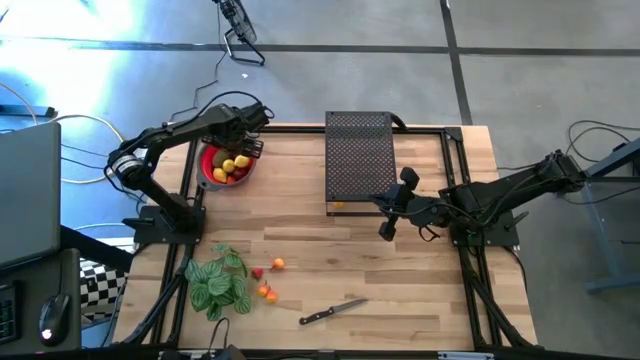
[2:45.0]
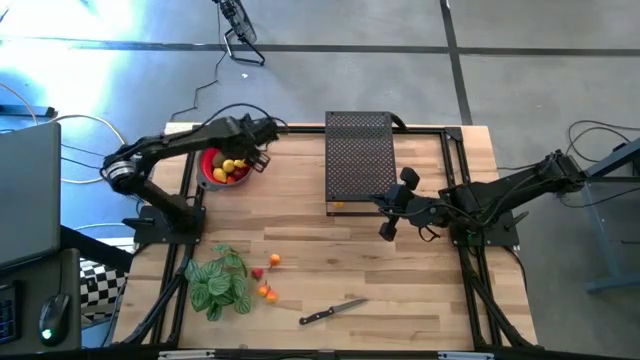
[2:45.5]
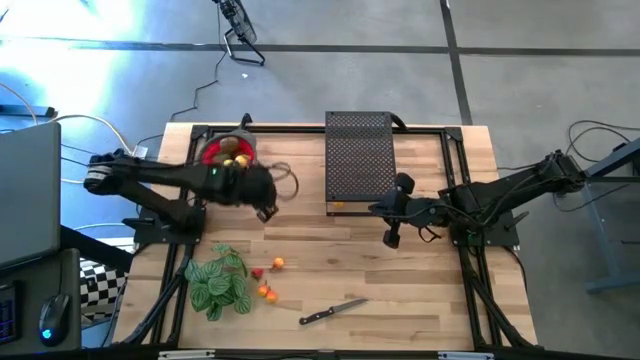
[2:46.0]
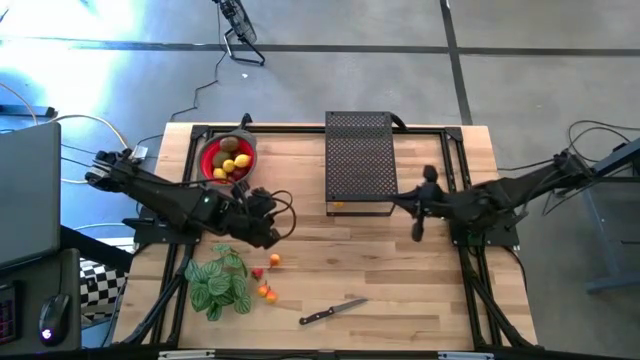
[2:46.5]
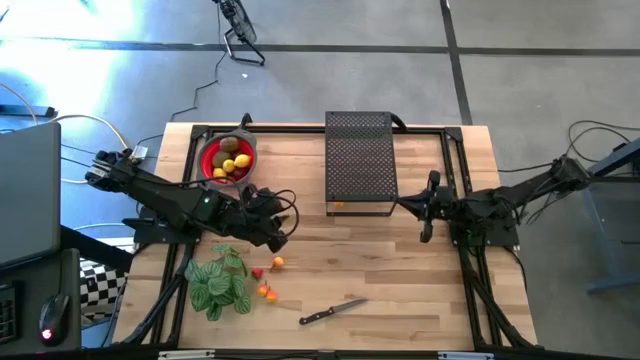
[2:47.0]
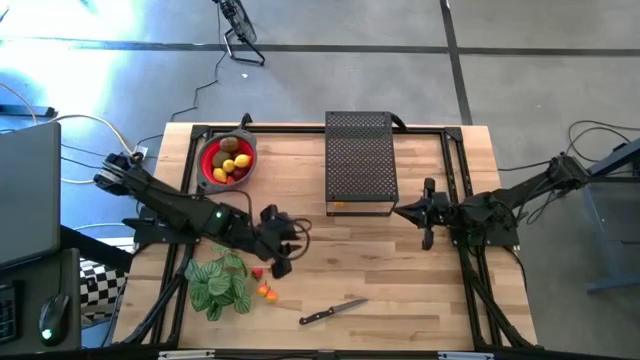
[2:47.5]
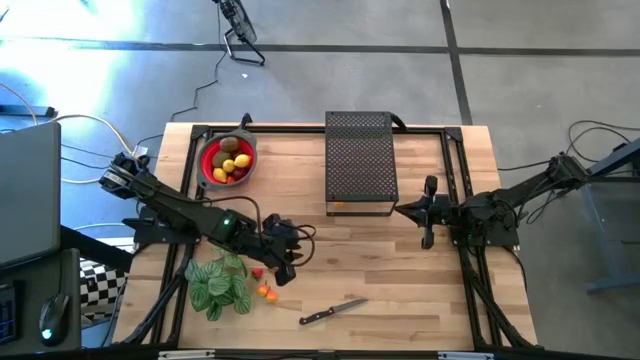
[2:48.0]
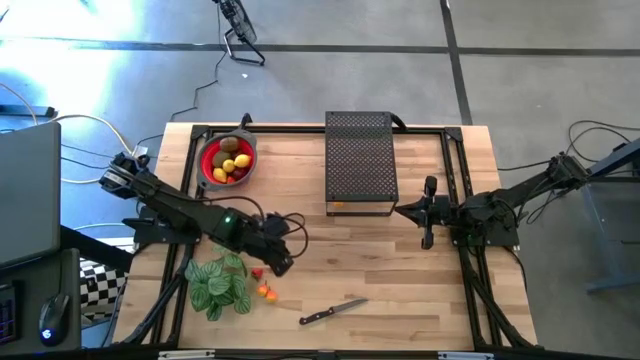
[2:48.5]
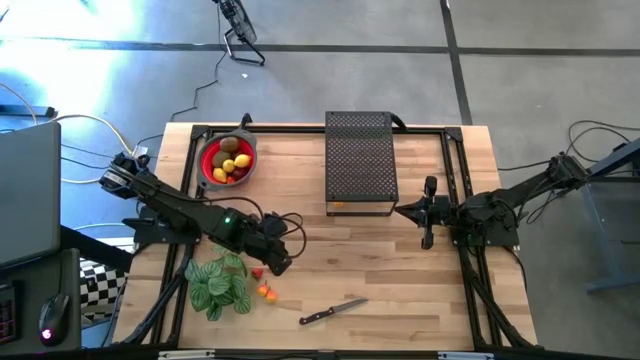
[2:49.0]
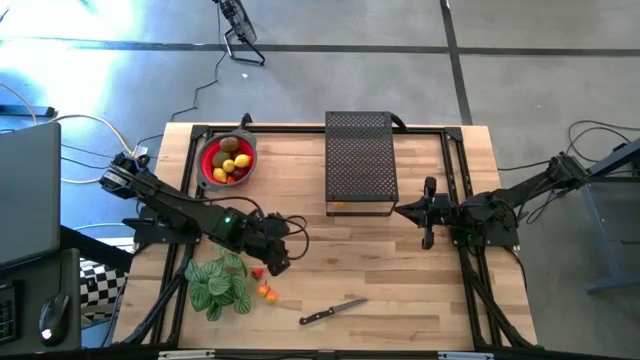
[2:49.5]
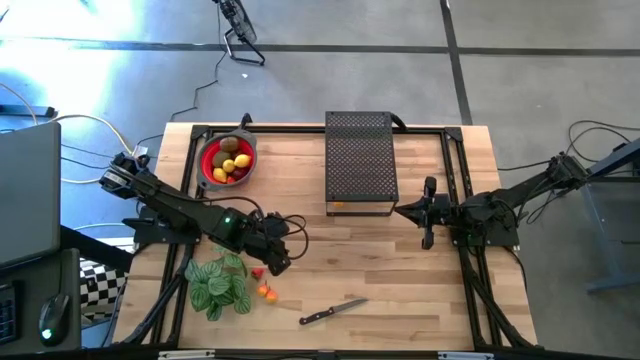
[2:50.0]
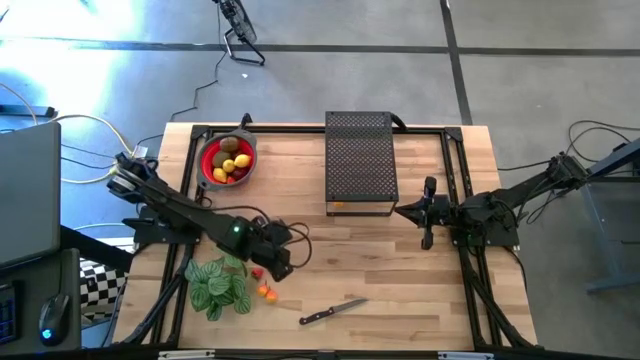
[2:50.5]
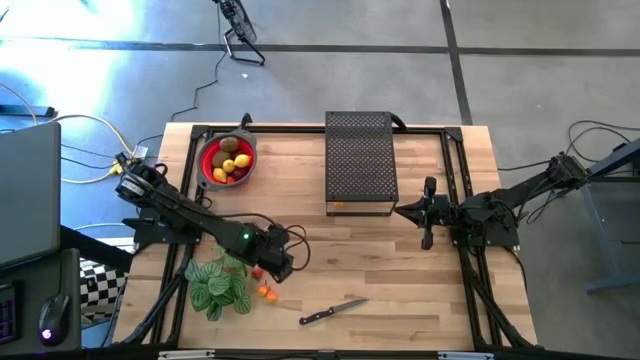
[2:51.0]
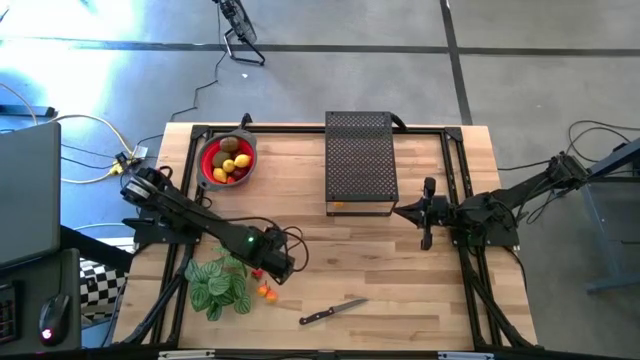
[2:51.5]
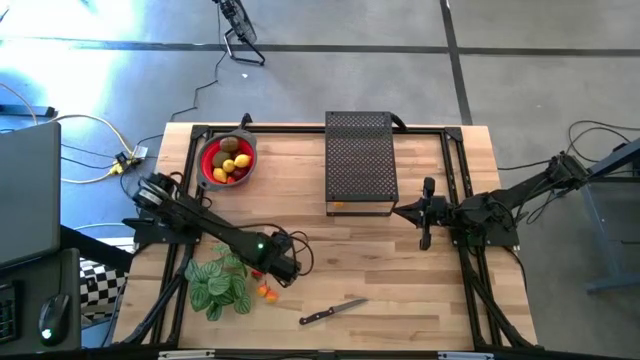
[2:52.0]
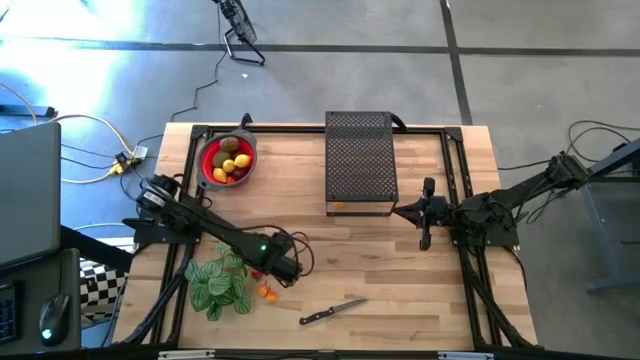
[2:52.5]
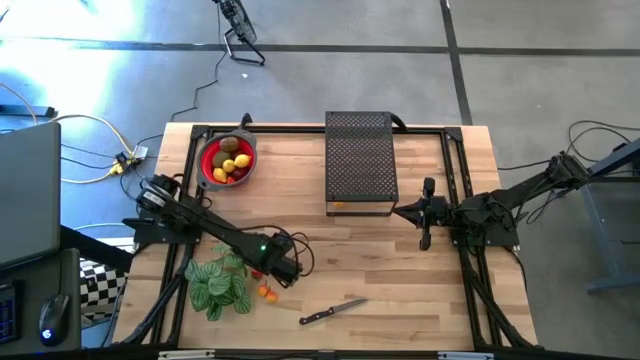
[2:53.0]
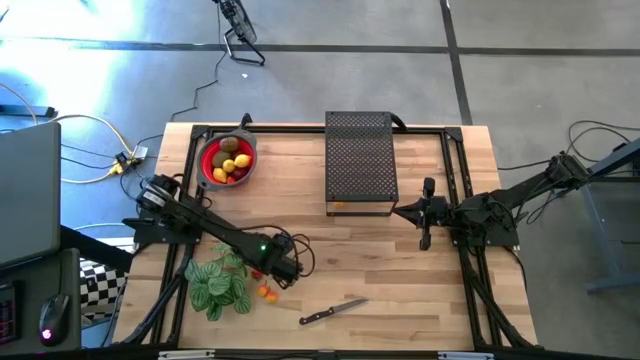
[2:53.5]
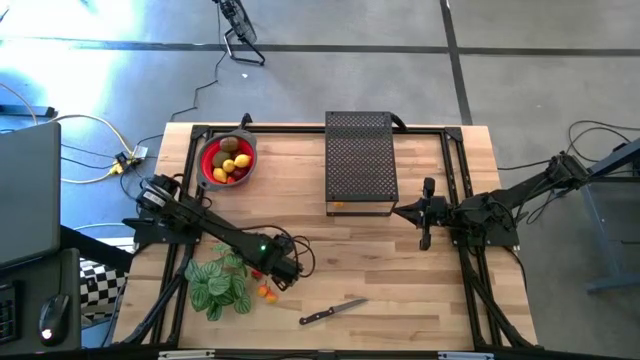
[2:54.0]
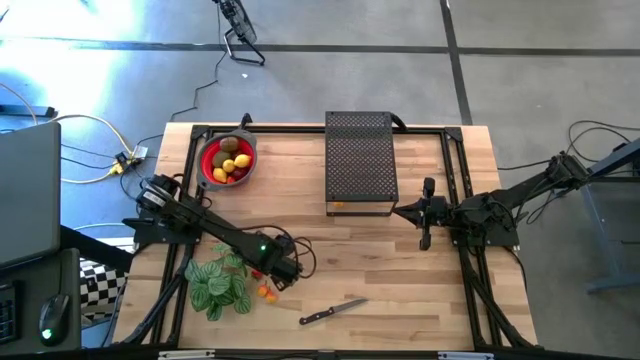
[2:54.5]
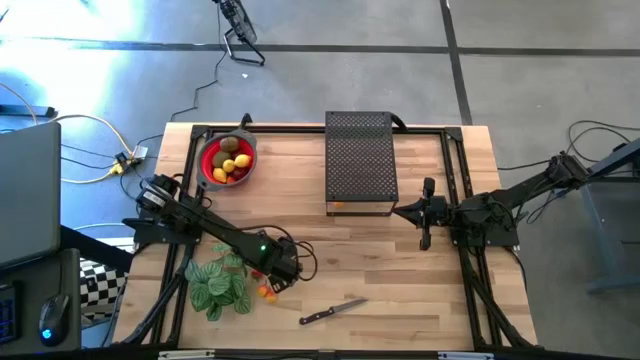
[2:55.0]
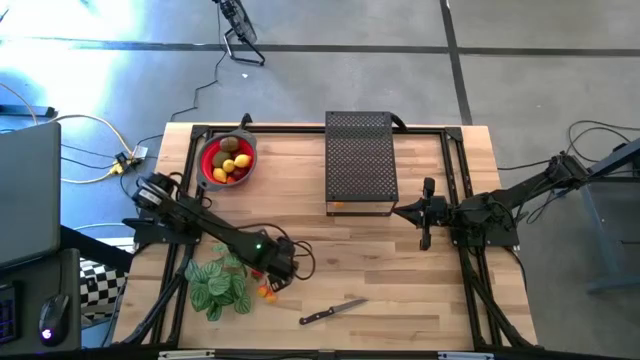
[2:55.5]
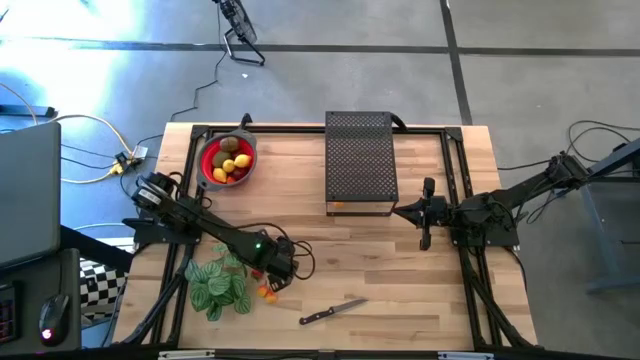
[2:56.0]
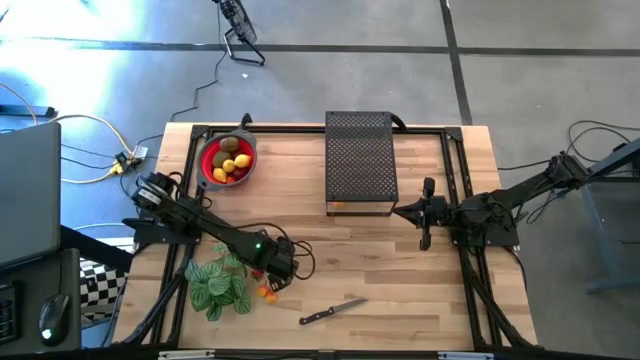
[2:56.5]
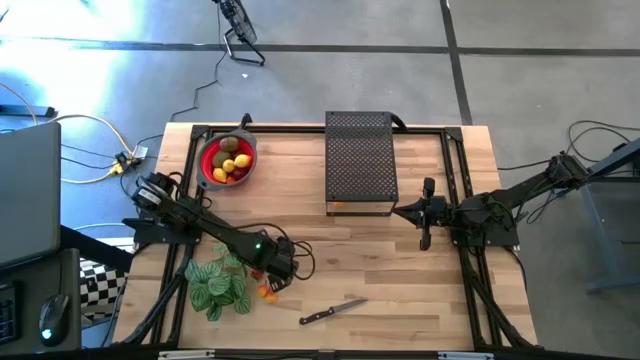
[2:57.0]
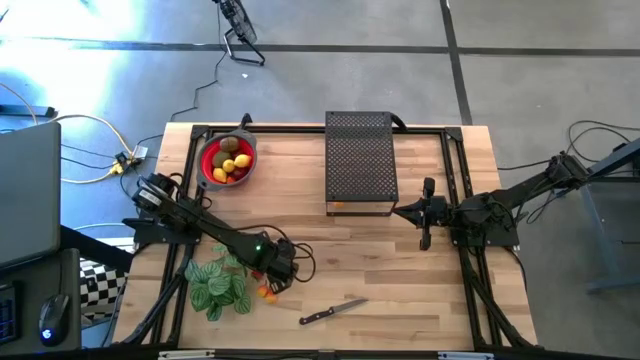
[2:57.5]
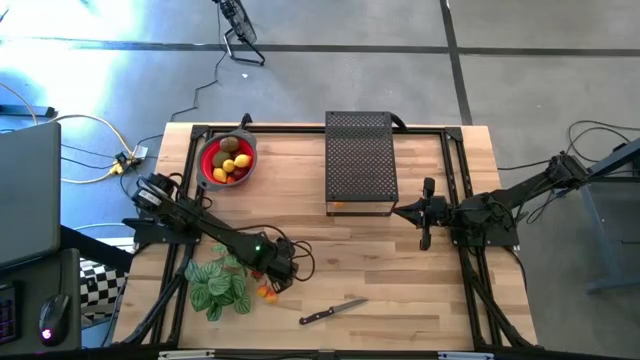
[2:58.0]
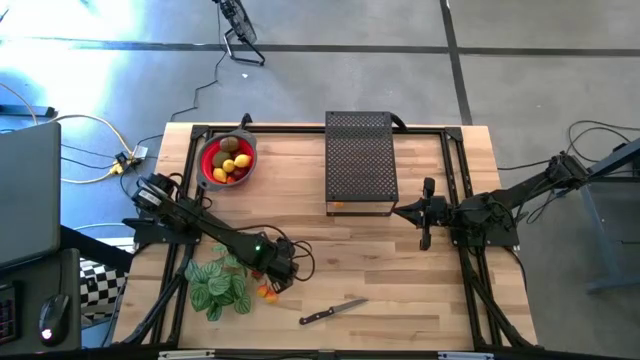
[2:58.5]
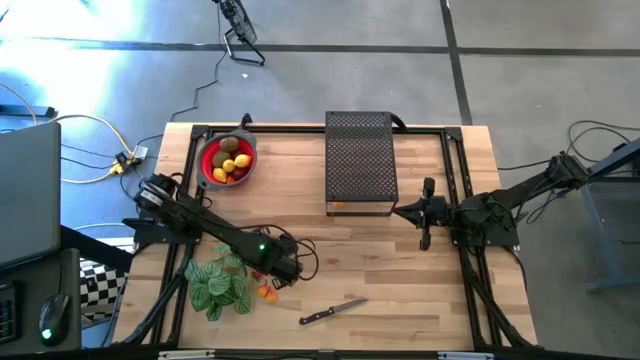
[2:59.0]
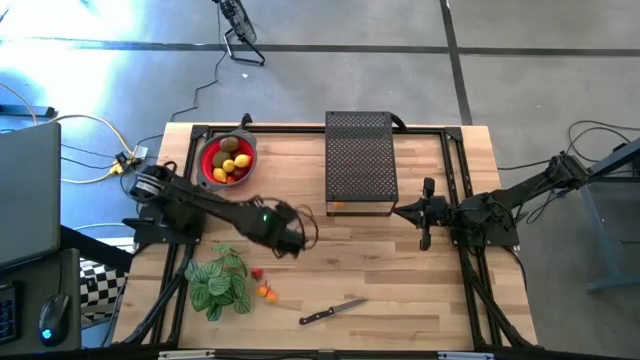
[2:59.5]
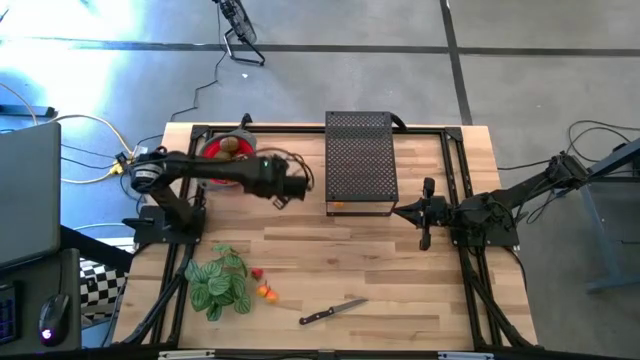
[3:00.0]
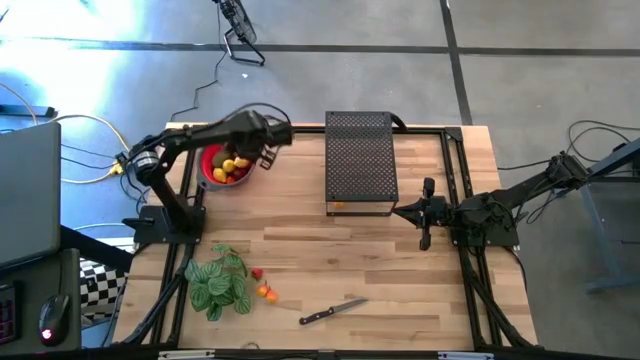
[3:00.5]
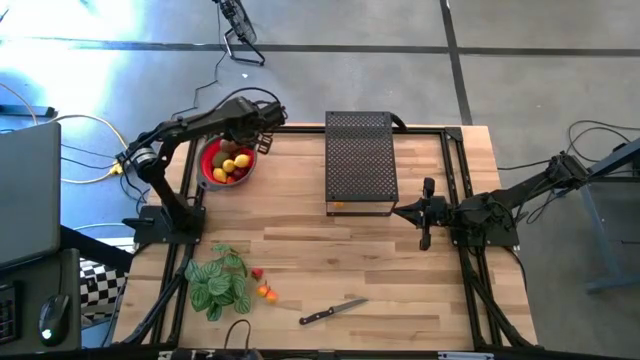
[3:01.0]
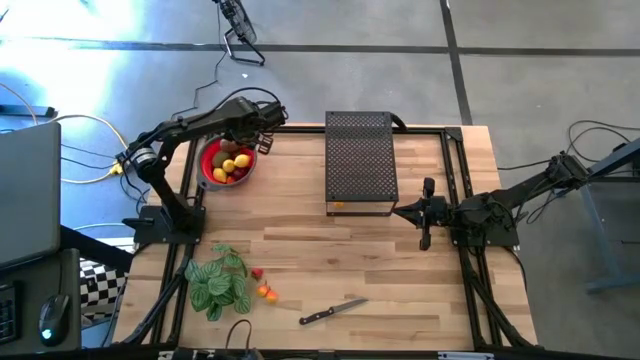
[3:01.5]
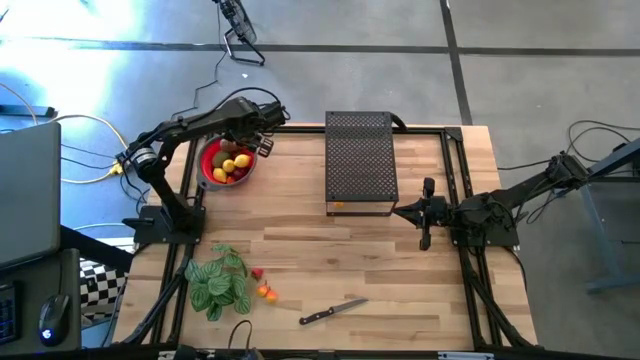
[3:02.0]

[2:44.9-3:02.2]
Task: Pick & Place Fruit
Put the orange pear into the strainer bowl

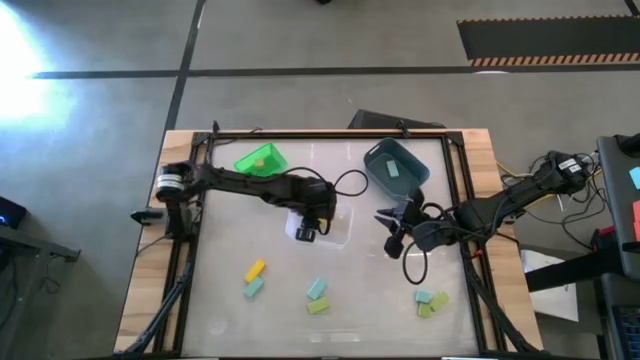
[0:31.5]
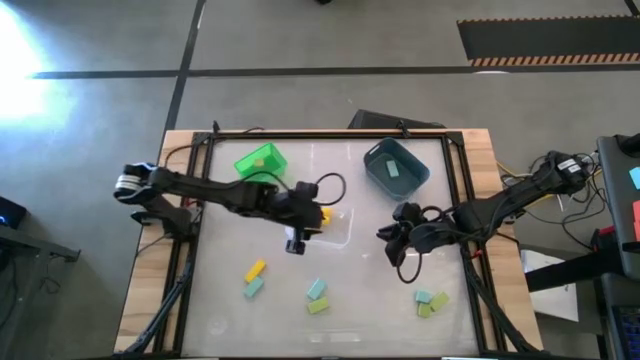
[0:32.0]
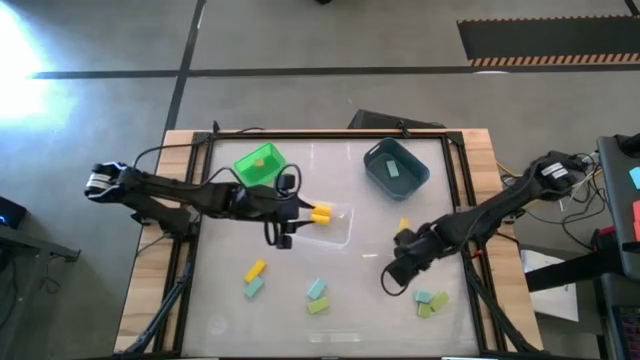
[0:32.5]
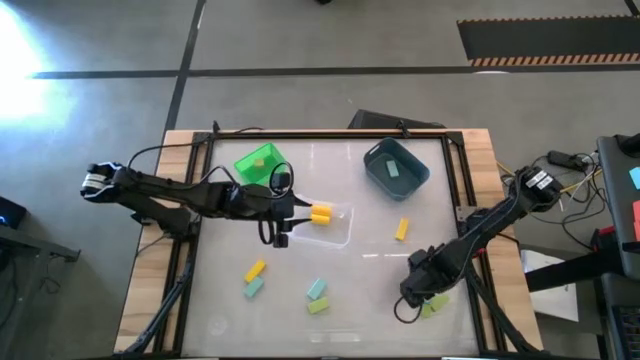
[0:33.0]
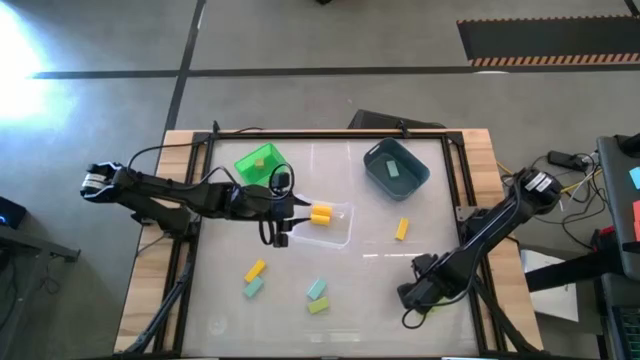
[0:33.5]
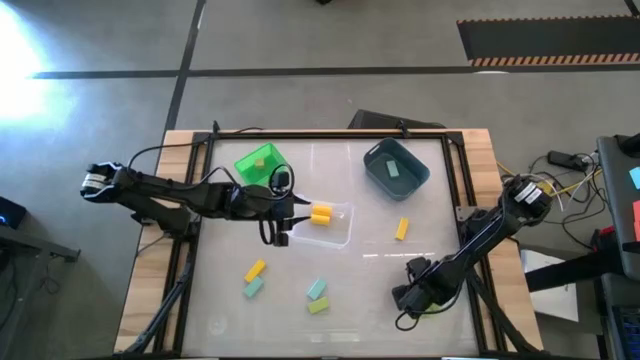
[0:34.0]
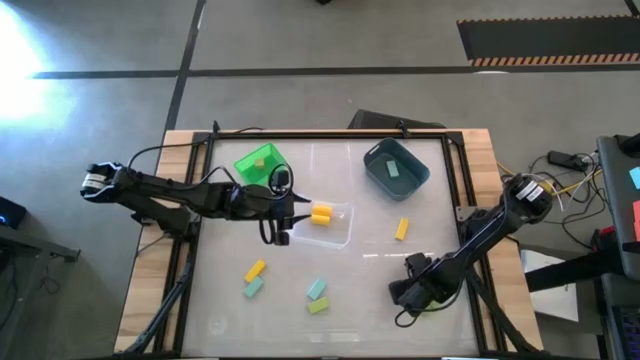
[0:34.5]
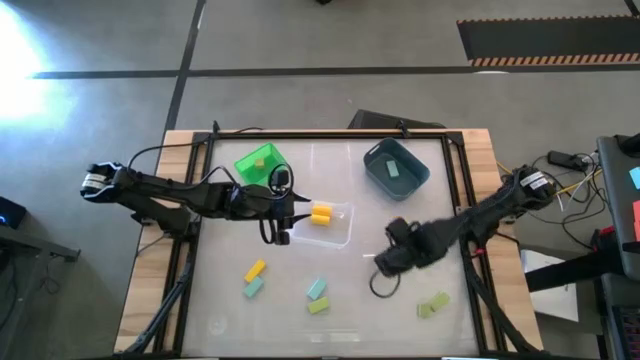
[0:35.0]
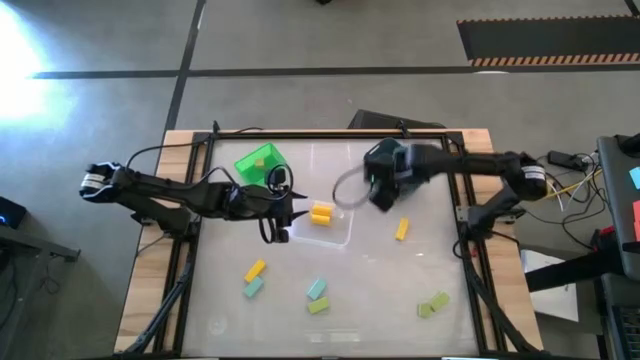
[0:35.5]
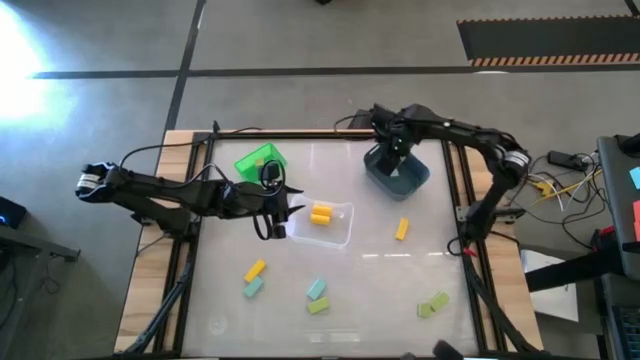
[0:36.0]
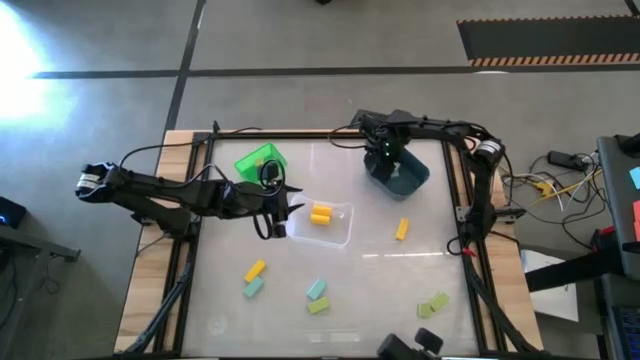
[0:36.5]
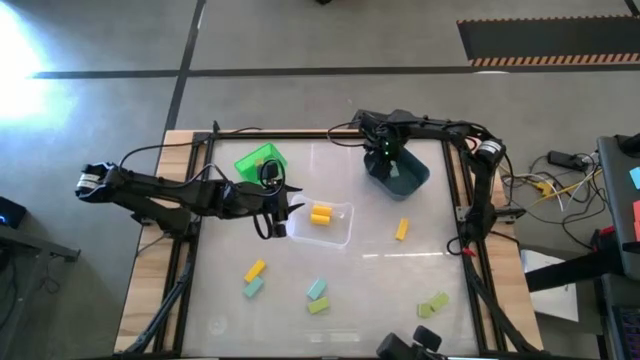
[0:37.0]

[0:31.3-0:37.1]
Task: Sort & place blocks by color
Put the blue block into the blue bin
